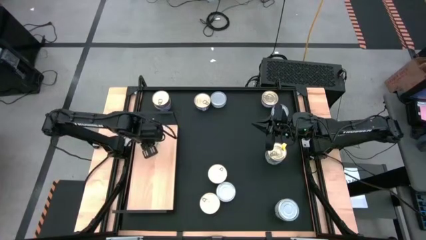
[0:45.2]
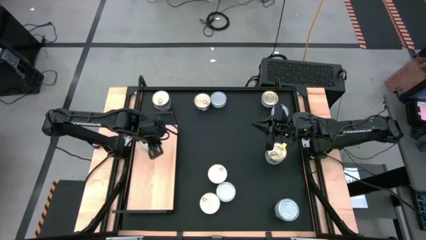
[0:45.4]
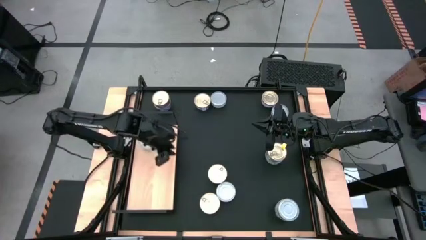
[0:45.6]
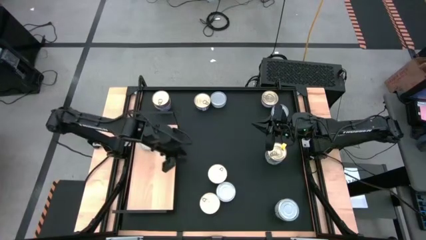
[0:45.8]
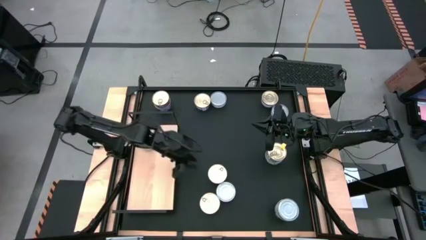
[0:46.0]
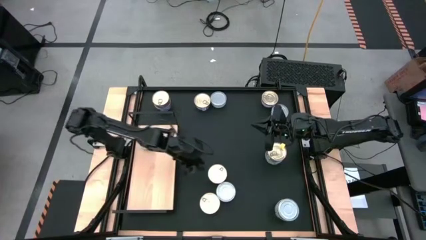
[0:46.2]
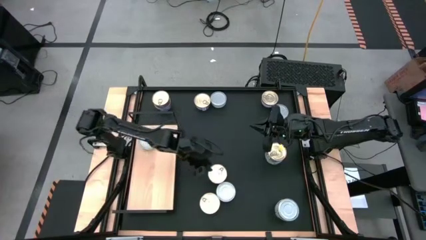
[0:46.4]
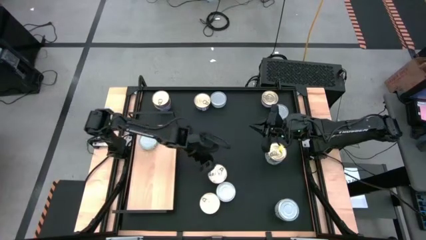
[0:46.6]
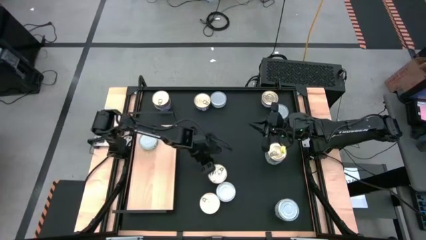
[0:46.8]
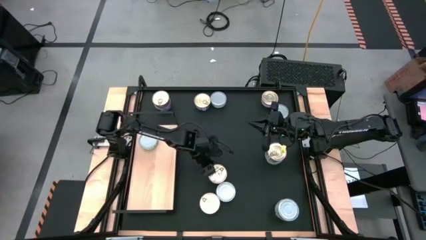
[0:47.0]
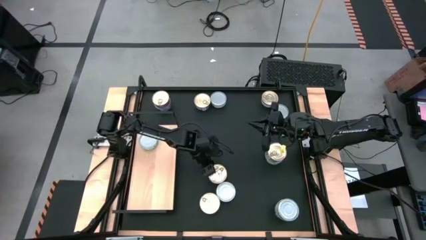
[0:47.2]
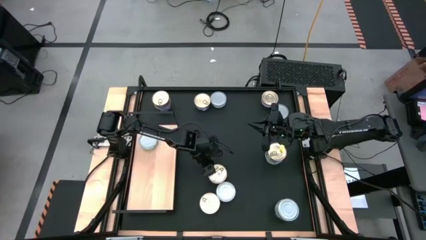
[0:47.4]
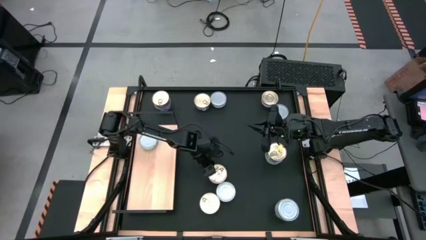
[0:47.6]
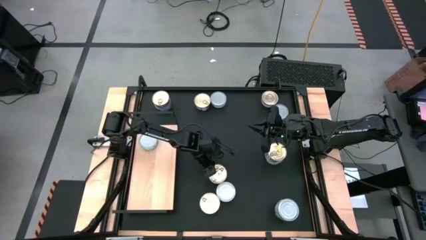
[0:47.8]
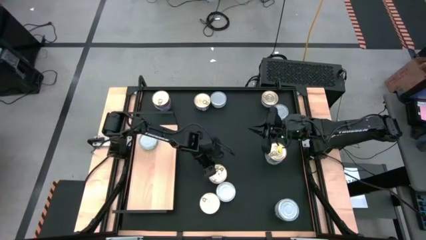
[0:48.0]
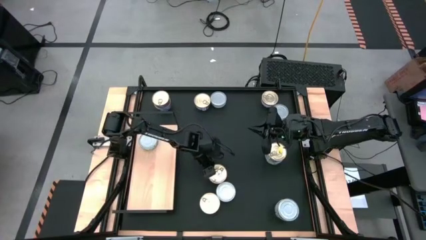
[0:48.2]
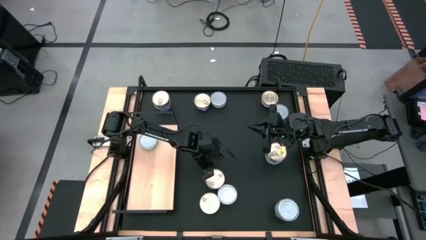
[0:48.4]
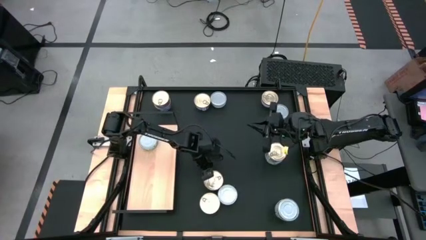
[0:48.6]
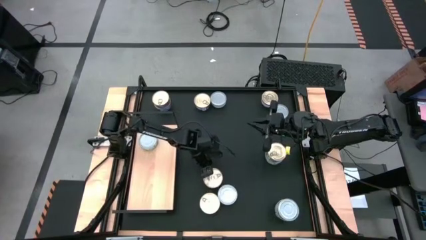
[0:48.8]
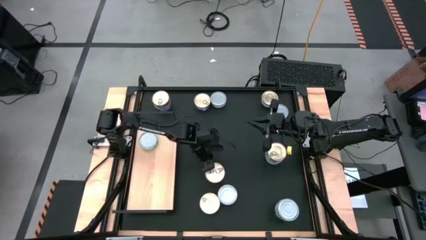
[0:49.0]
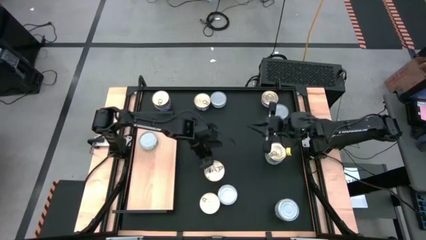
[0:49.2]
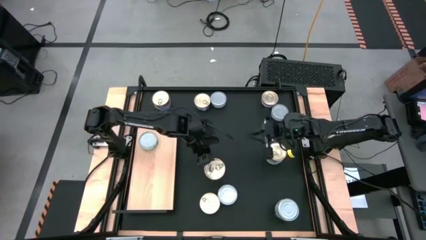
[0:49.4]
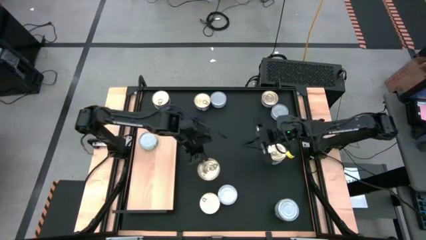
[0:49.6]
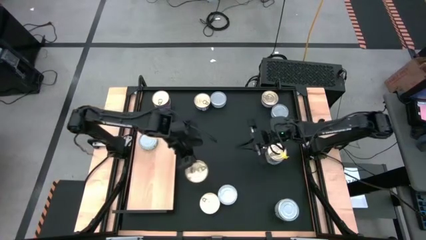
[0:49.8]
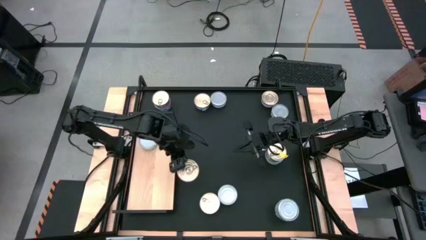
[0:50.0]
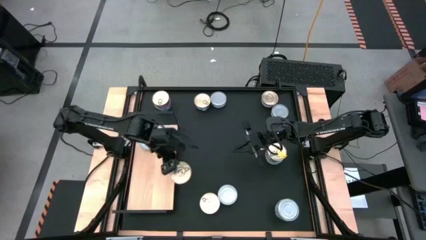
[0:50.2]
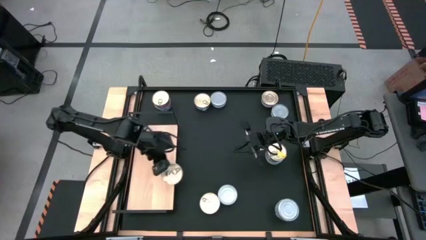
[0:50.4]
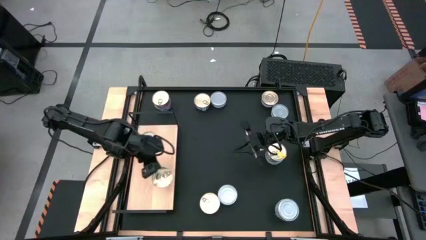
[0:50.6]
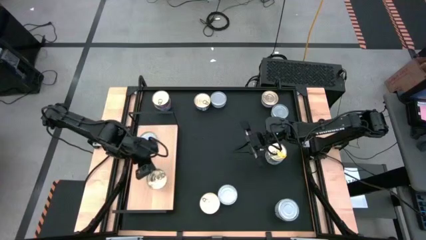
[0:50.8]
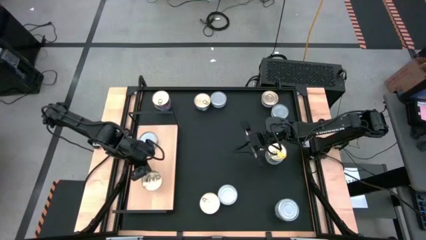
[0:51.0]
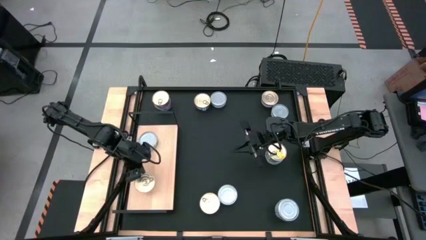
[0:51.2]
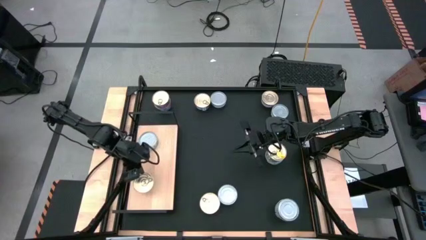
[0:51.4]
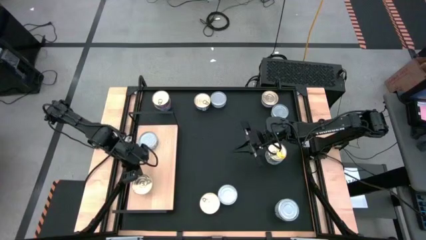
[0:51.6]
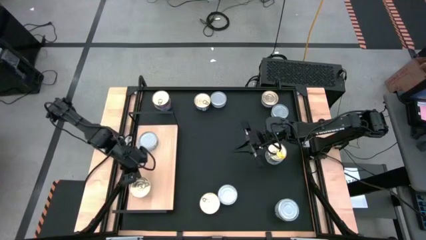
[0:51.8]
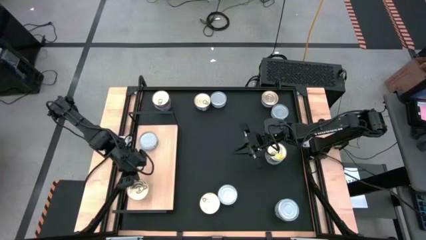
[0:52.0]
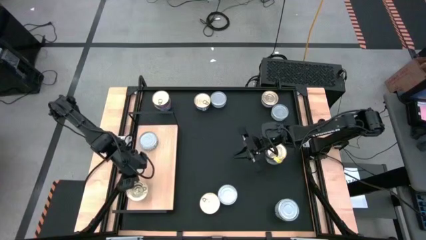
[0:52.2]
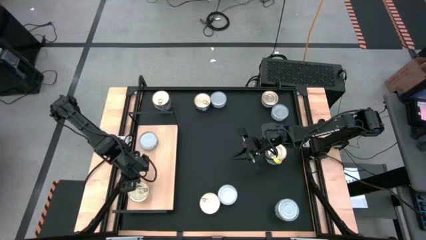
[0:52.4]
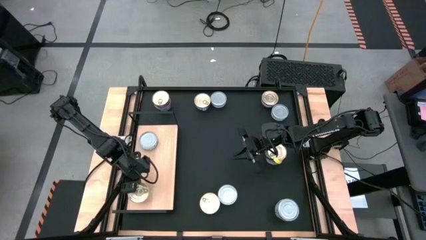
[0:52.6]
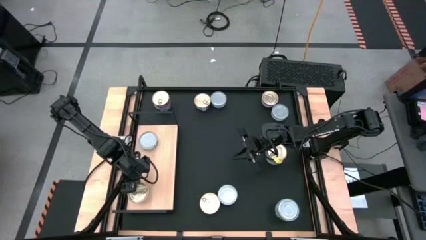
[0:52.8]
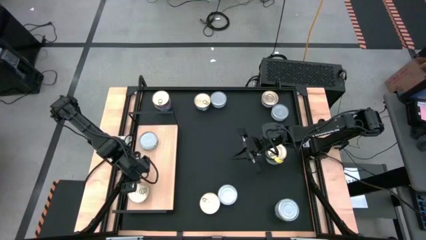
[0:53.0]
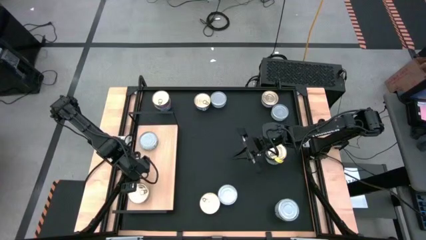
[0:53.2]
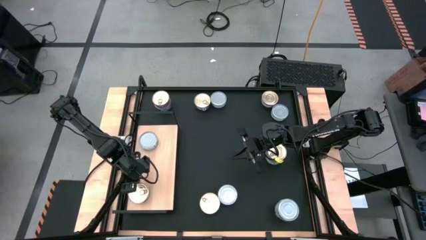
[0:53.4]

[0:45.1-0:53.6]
Task: Stack canned seafood by type on shelf
Put the blue tuna can on the shelf

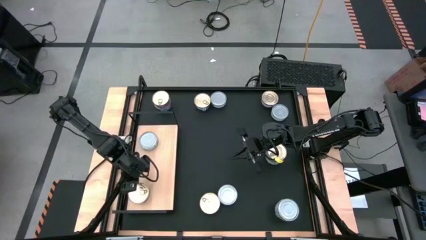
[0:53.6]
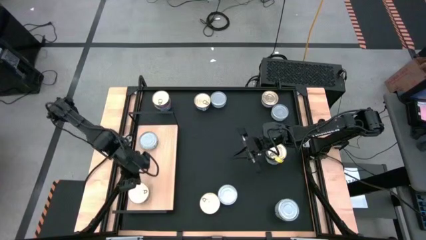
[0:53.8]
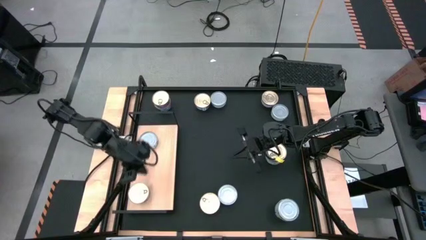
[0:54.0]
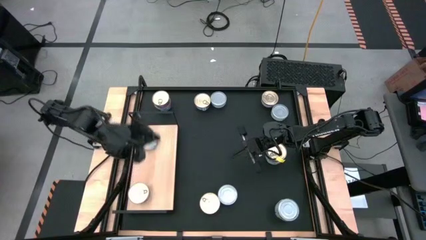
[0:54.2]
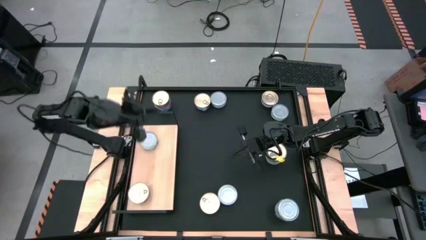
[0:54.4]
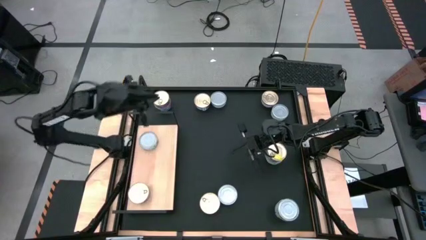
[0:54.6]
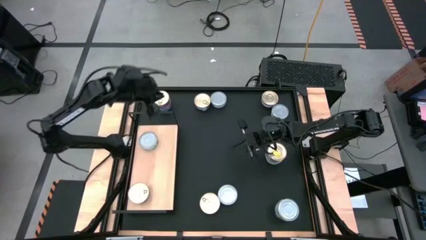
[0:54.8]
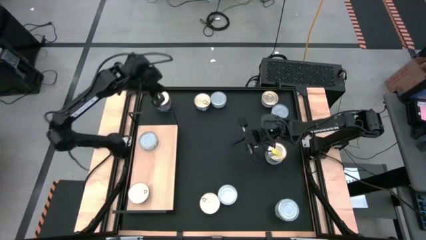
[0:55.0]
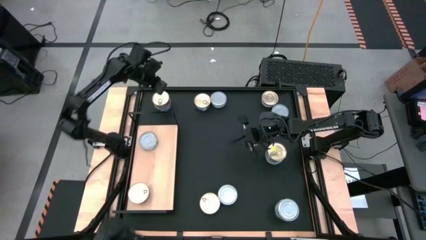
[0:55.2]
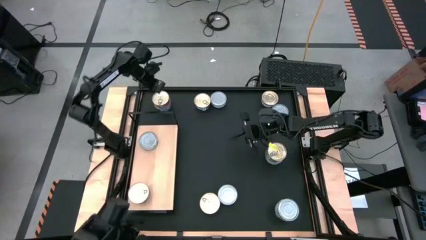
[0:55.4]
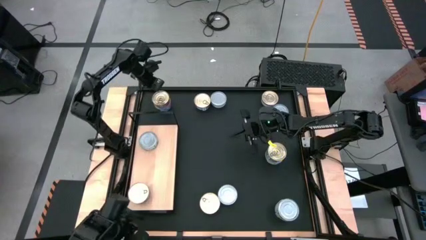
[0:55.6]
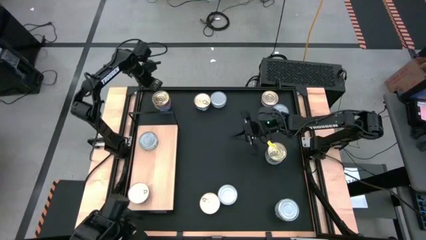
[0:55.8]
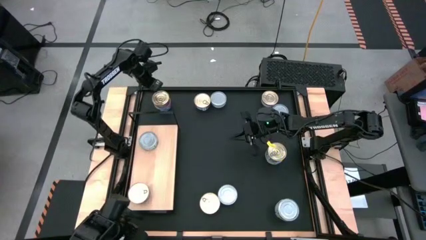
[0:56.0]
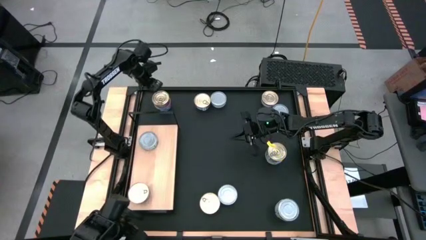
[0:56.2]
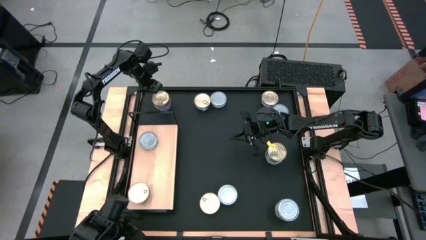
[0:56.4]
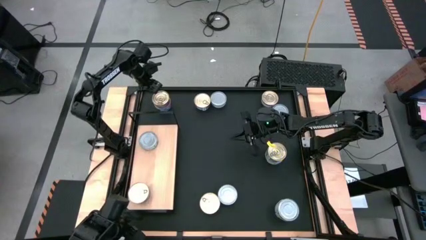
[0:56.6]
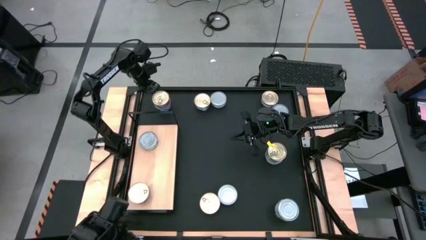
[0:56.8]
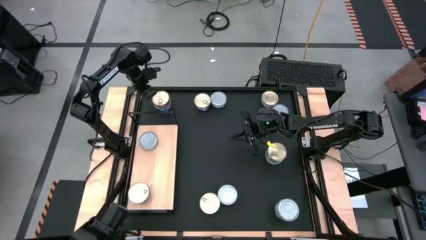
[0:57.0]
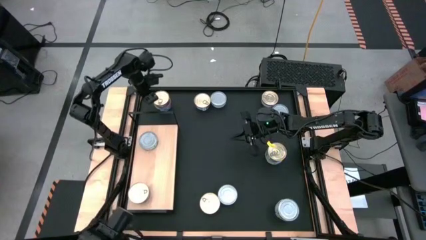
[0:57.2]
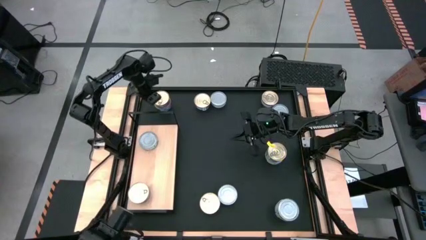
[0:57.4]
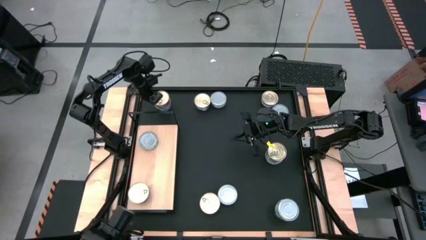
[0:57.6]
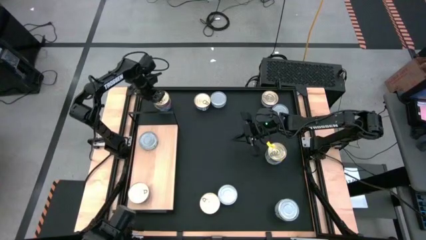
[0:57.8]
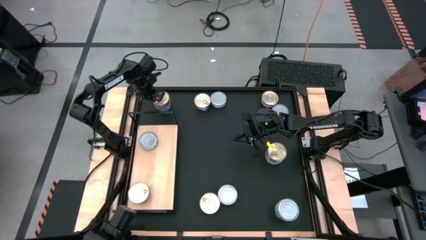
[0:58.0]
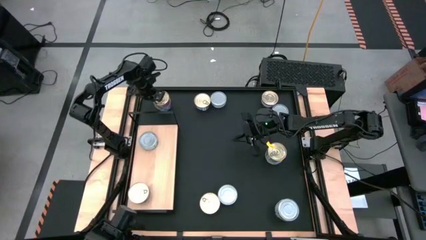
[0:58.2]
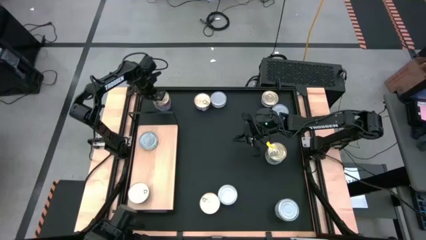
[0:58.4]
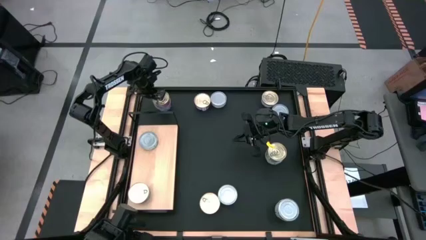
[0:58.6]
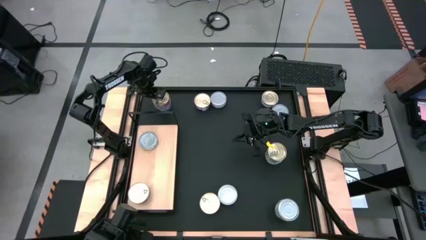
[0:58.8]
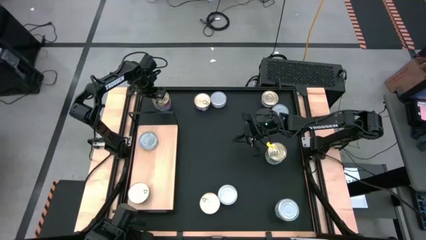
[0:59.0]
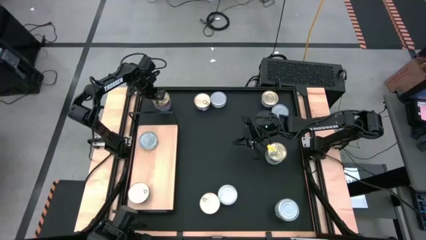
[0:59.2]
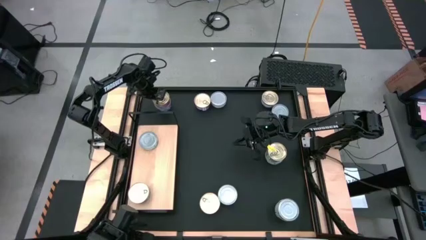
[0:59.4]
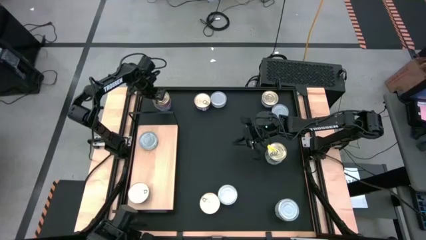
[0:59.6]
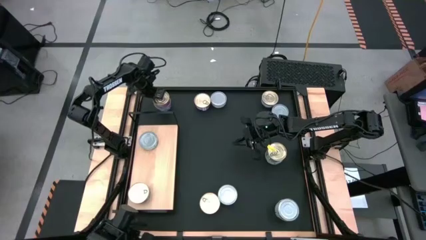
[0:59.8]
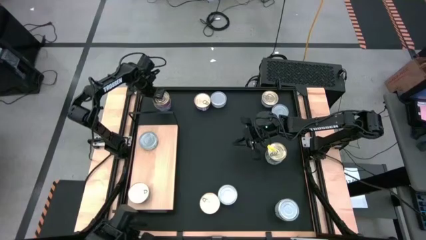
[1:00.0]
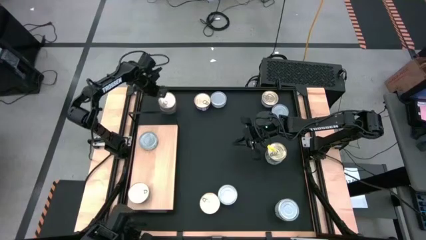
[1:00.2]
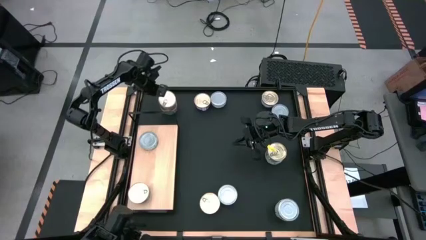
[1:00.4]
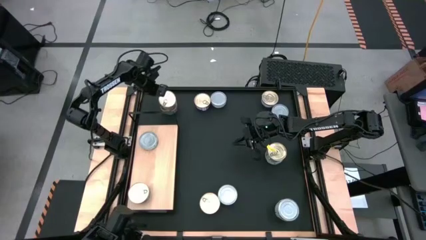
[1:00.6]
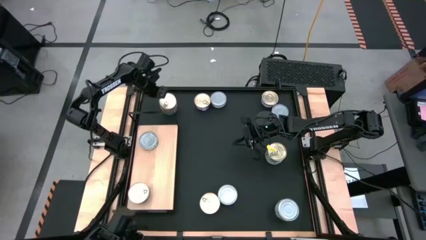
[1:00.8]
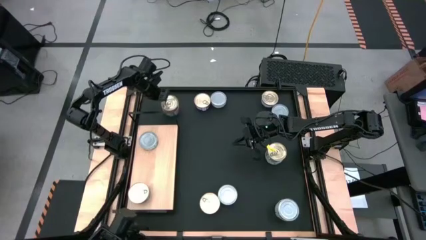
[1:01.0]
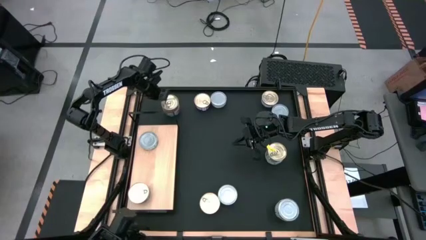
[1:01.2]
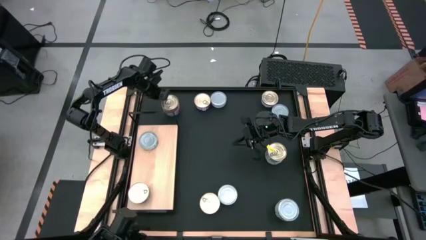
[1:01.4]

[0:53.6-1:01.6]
Put the blue tuna can on the shelf

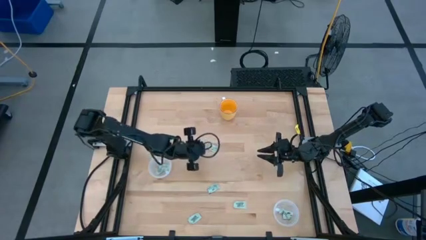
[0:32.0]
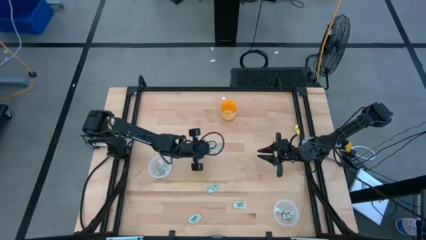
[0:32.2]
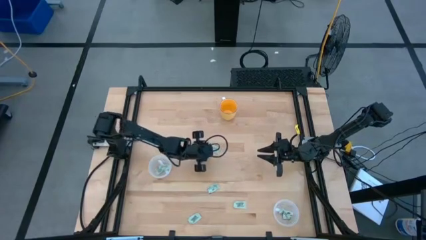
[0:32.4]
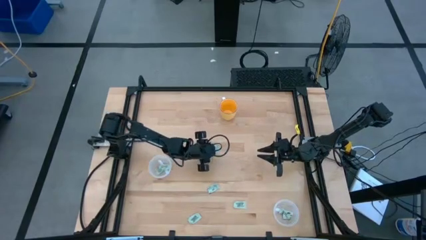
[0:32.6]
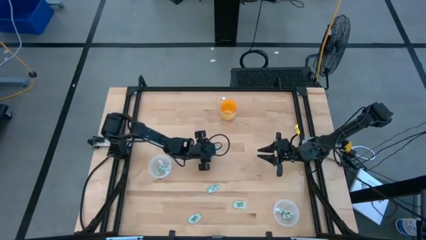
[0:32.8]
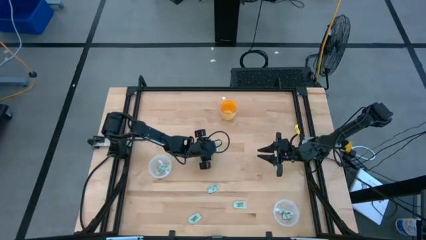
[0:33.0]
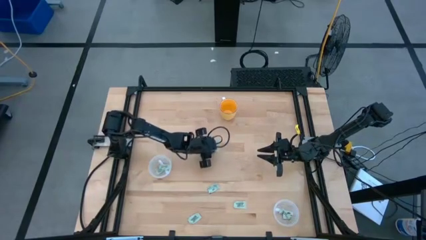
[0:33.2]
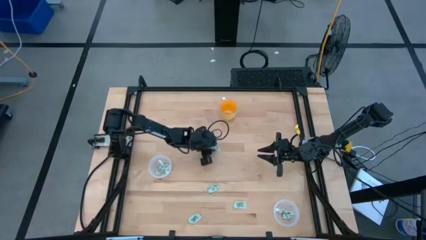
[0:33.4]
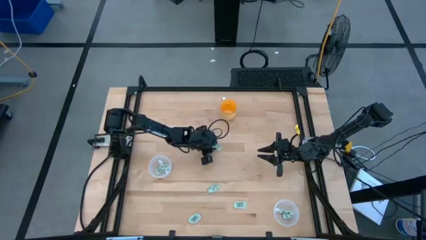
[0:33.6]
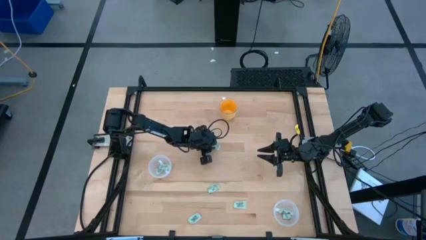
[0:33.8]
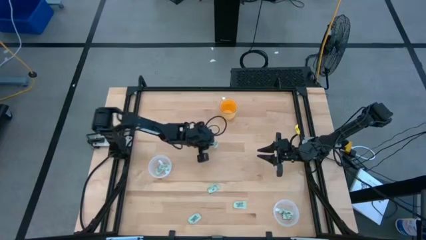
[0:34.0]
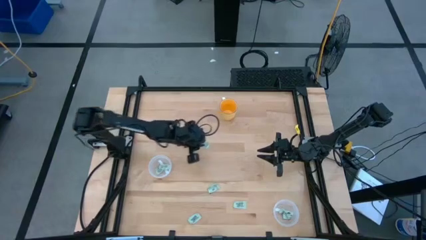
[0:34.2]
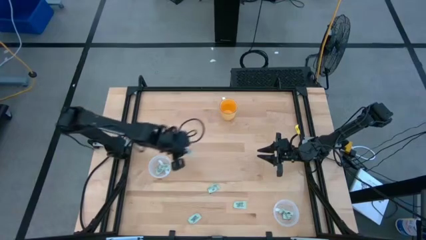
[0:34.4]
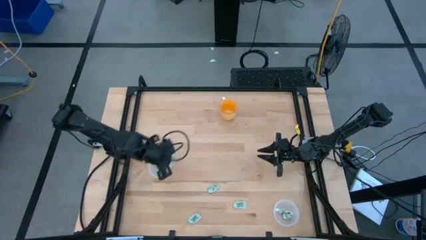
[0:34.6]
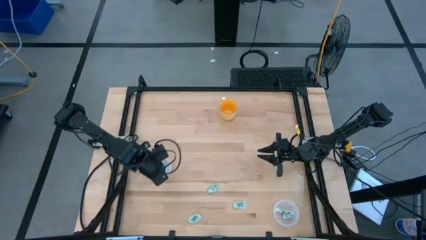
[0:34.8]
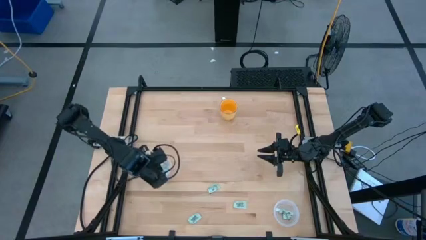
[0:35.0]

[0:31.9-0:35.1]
Task: Pick and place Stevia / Truvia into bins
Put the light green stevia packet into the left transparent container
